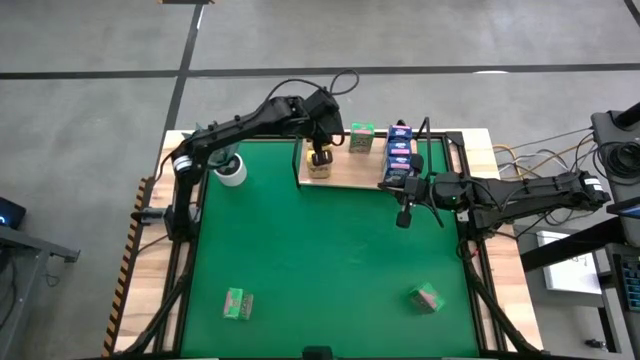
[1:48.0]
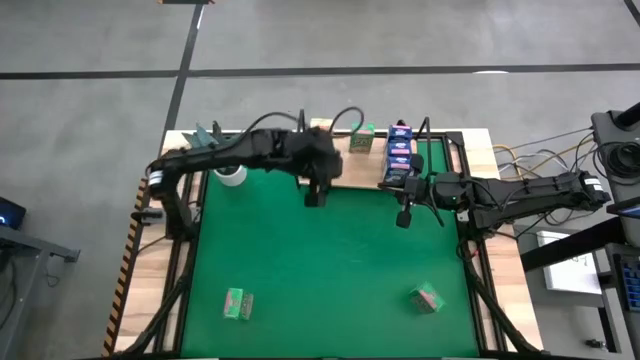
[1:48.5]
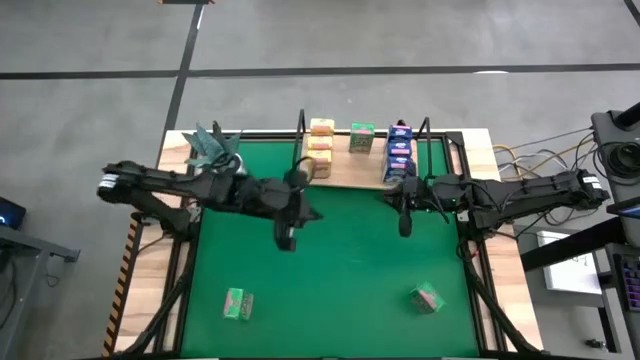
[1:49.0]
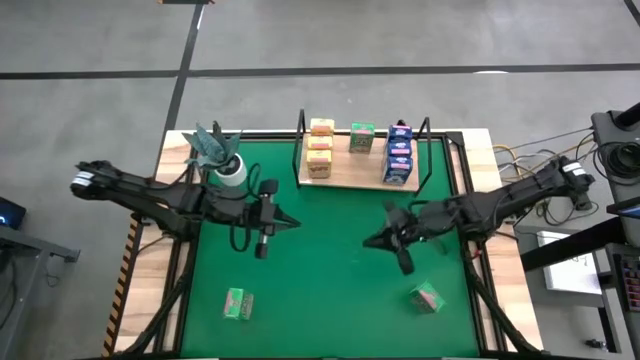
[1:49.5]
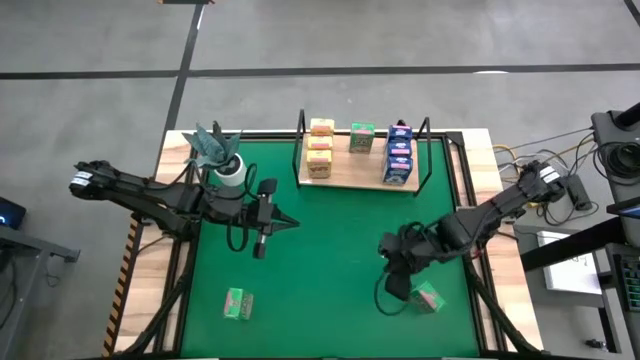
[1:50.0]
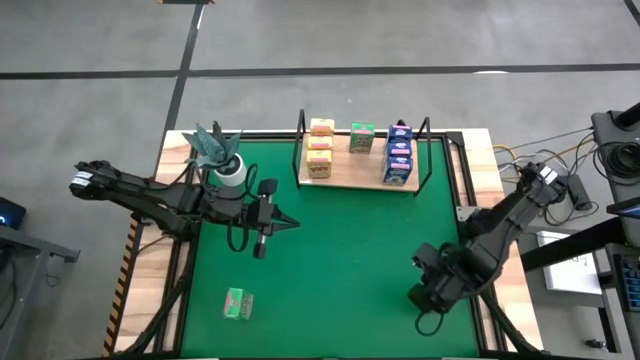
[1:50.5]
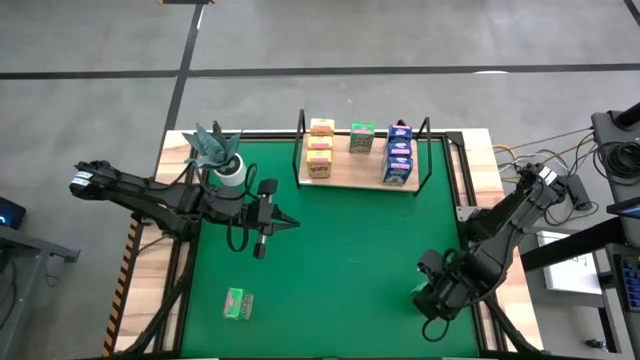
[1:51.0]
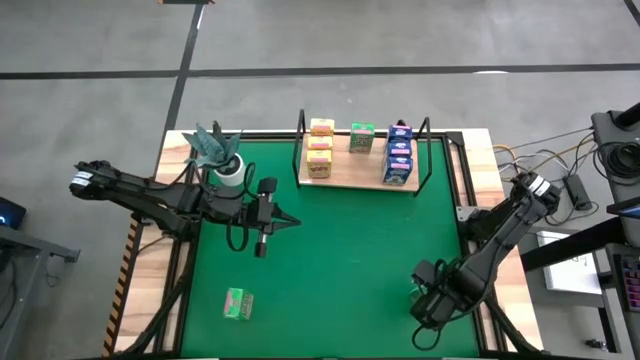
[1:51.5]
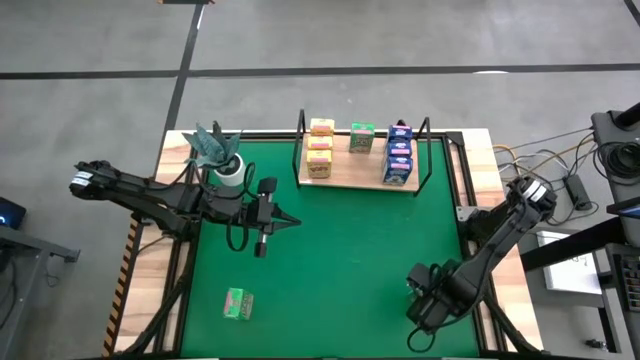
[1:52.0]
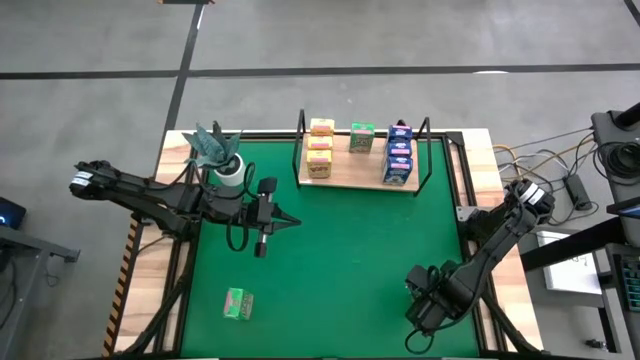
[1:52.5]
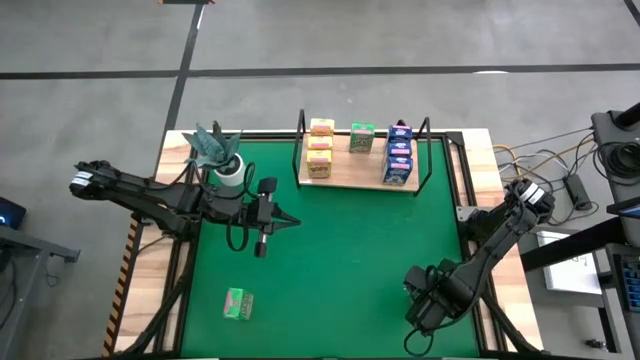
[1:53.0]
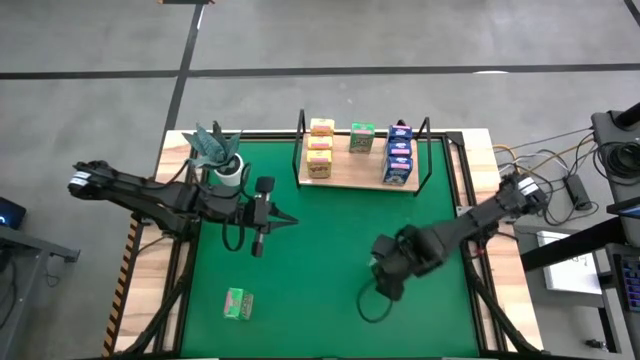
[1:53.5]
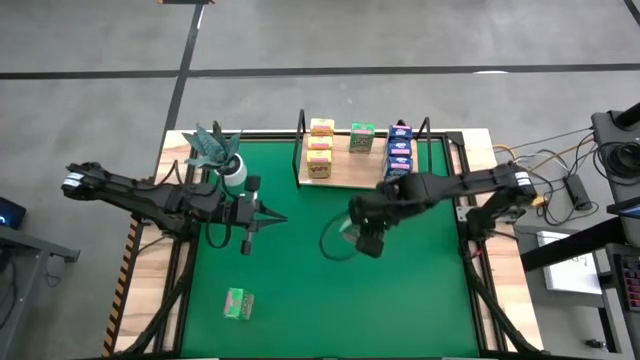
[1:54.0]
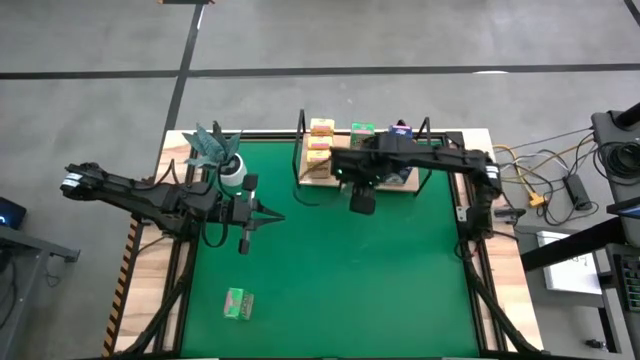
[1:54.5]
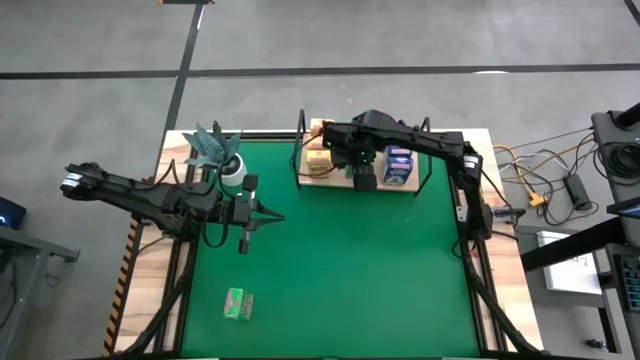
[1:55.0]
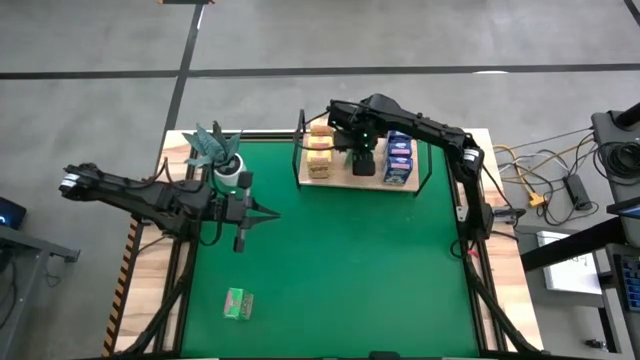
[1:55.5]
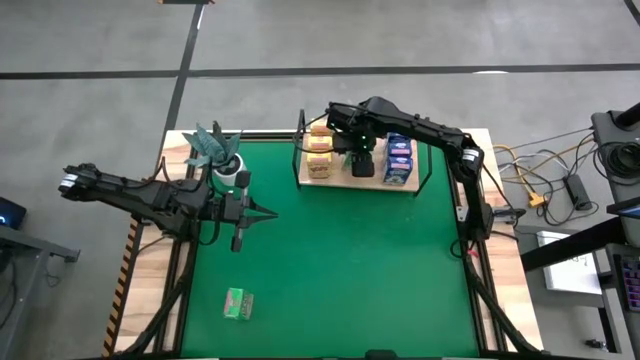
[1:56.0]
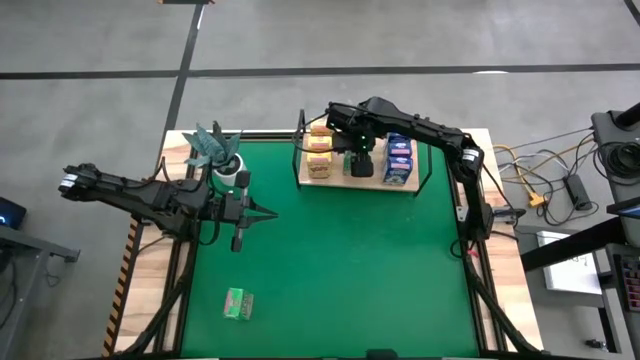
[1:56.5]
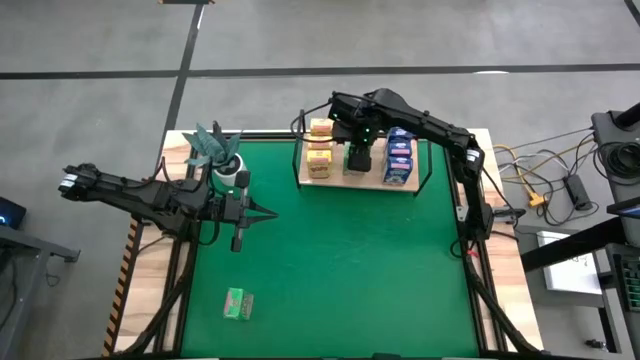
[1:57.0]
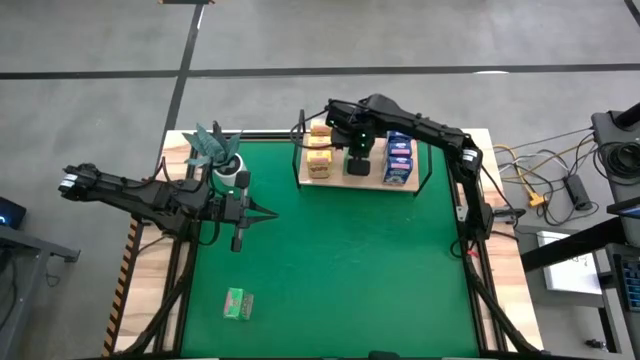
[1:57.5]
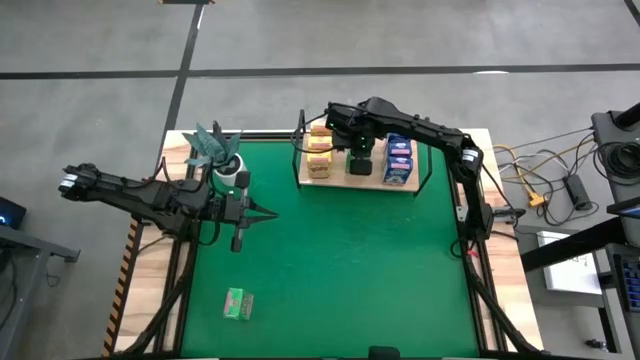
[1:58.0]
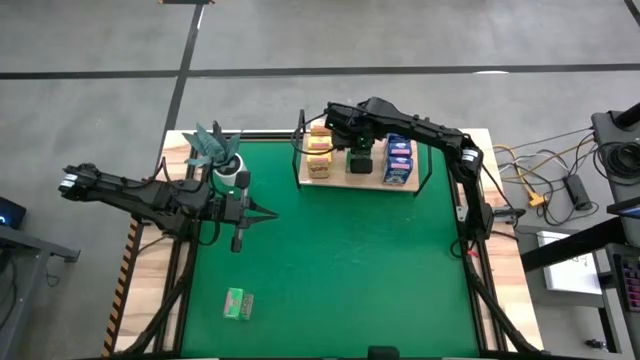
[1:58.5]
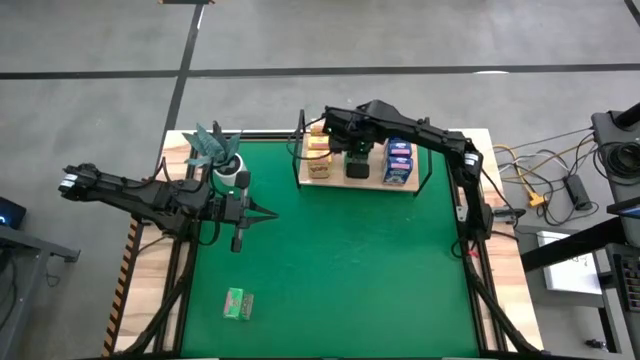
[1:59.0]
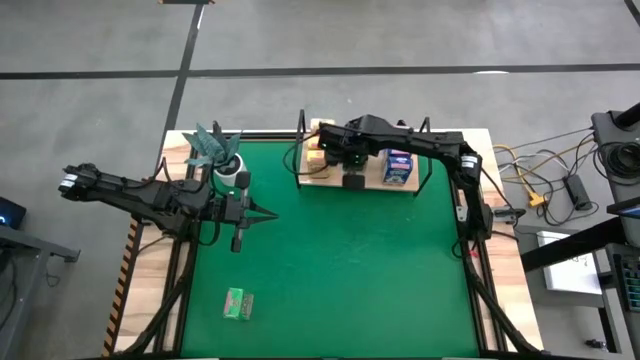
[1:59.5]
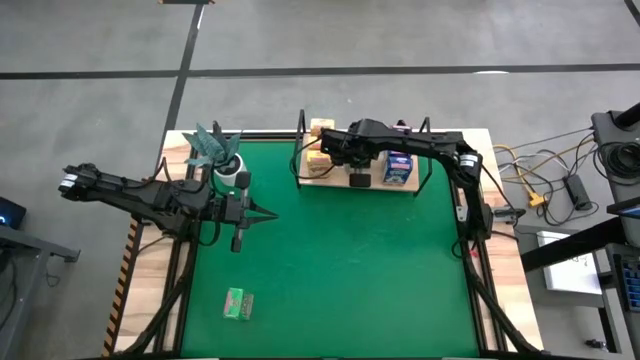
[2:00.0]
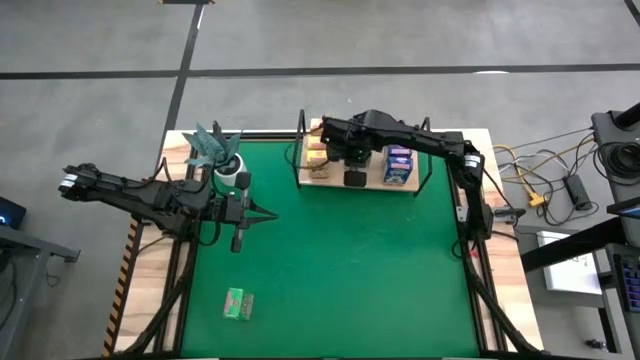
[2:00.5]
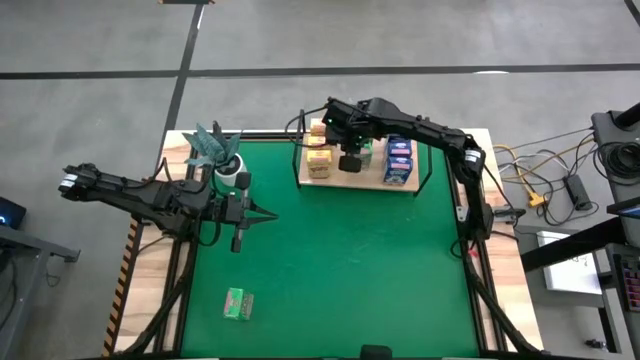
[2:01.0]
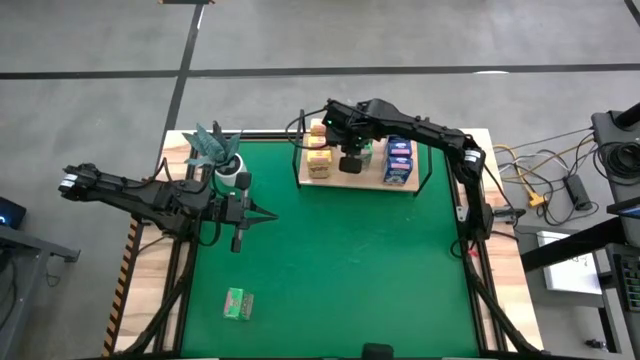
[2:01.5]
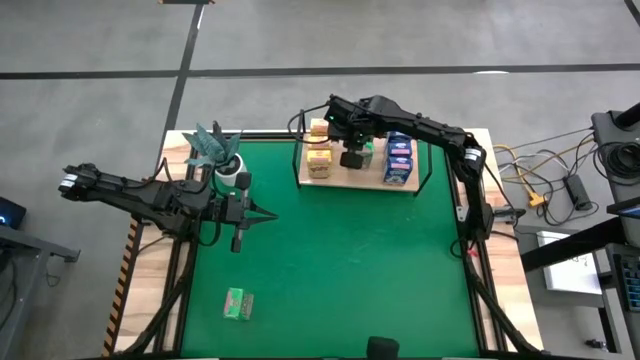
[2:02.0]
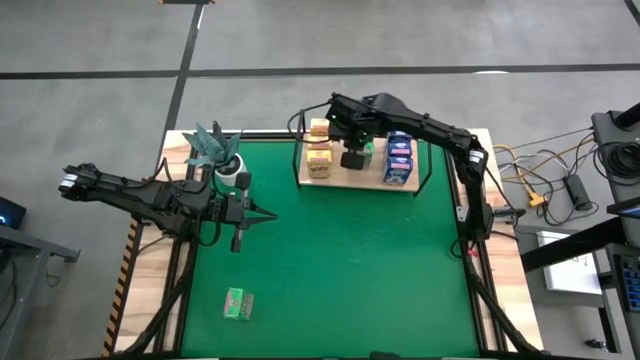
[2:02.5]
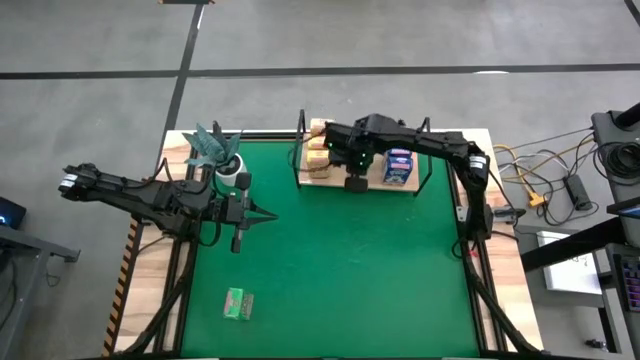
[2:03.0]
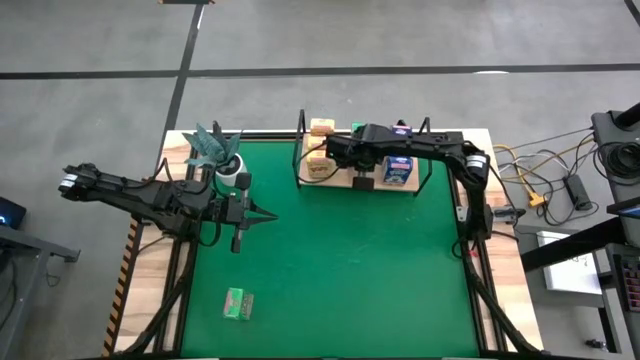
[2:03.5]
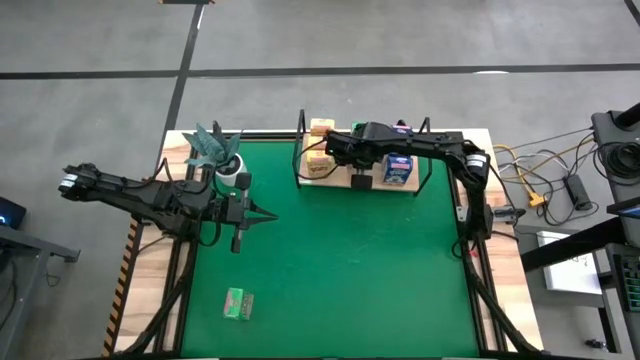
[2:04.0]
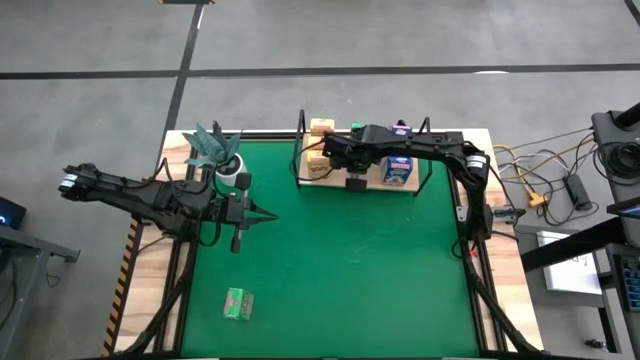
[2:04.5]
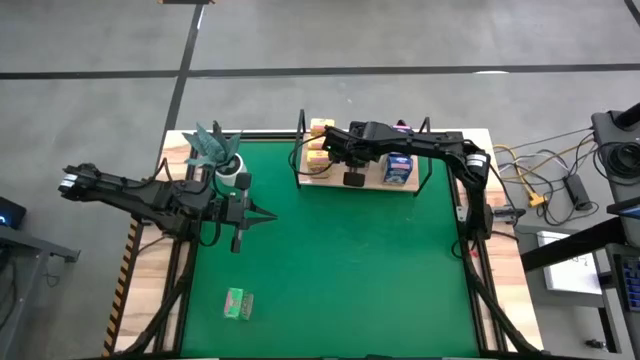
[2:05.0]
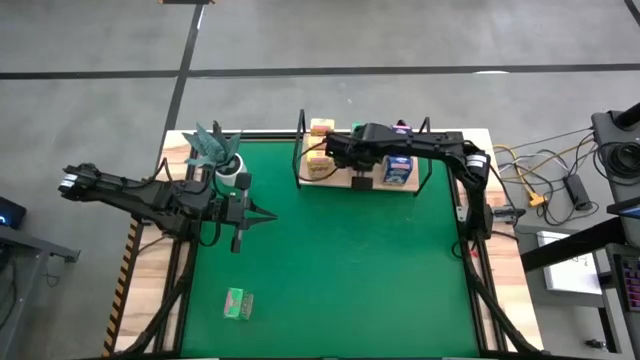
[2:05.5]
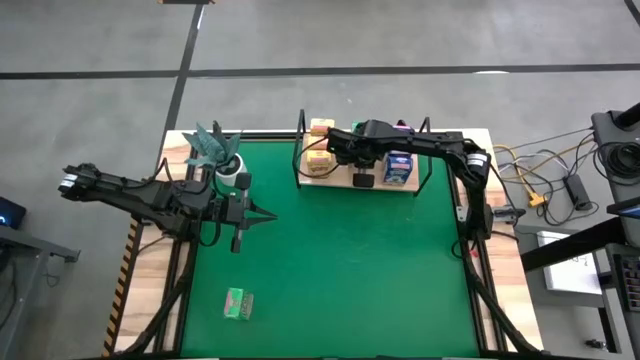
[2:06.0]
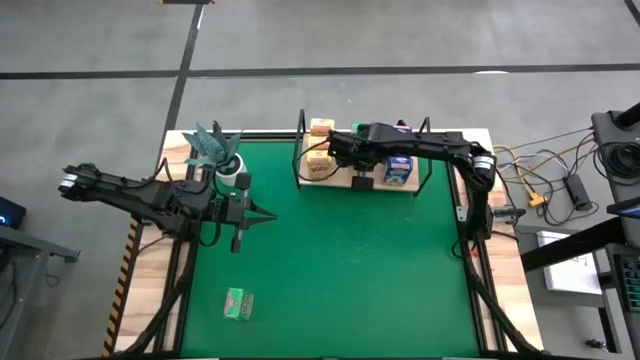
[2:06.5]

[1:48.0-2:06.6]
Task: Stack cereal on shelf
Put the right green cereal box on the shelf

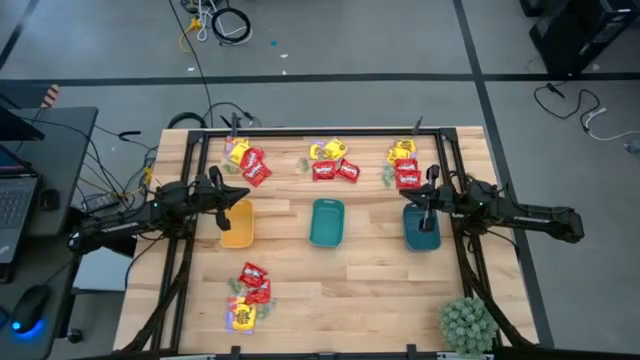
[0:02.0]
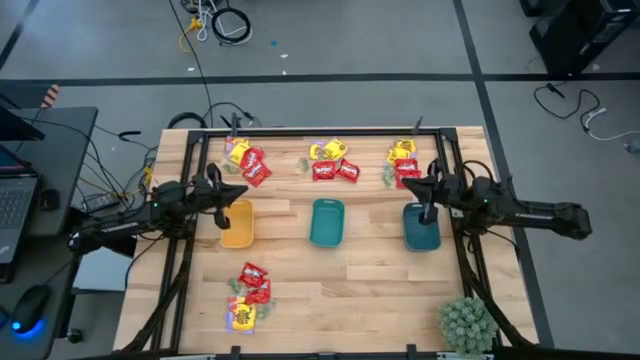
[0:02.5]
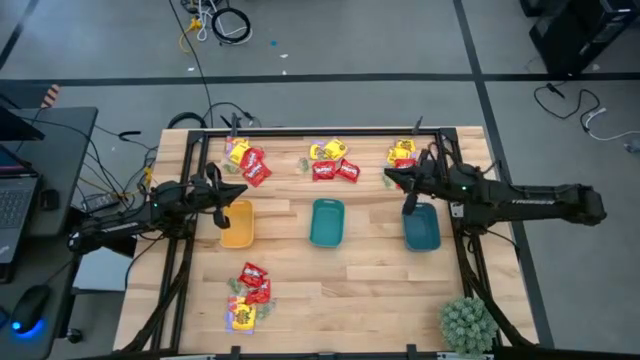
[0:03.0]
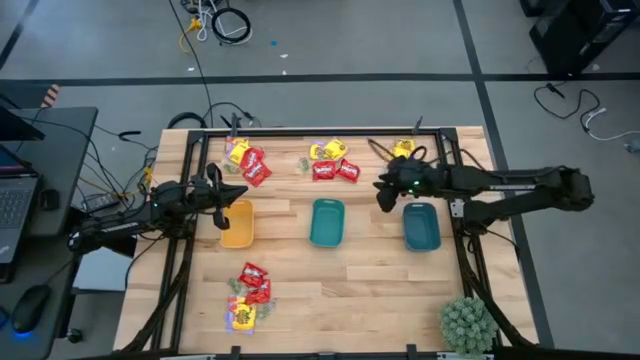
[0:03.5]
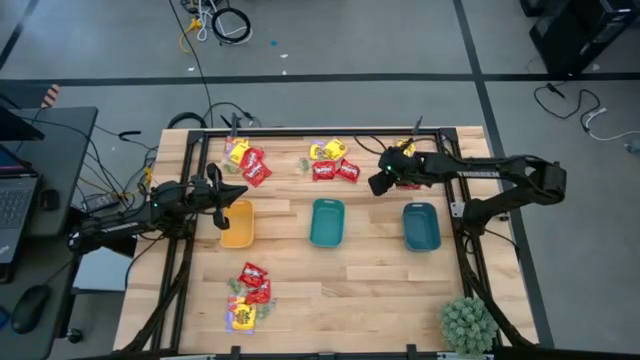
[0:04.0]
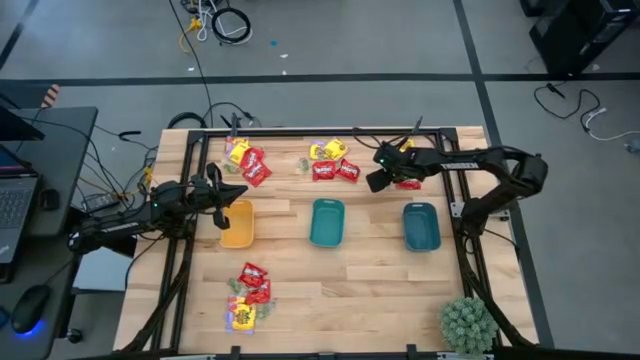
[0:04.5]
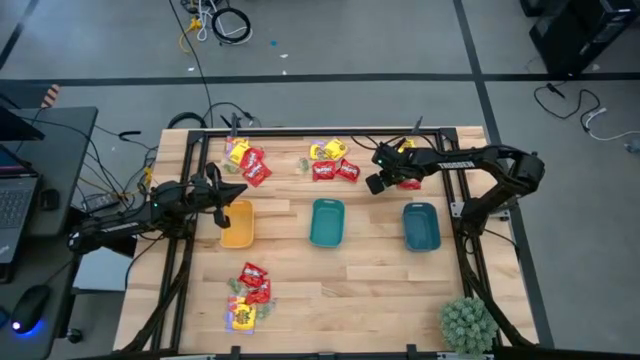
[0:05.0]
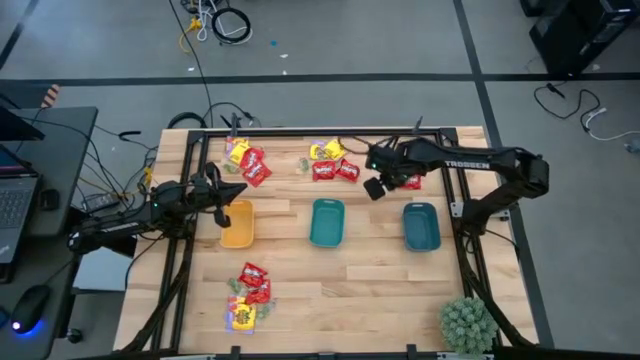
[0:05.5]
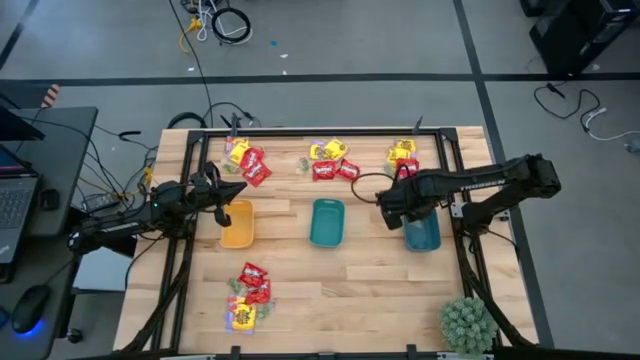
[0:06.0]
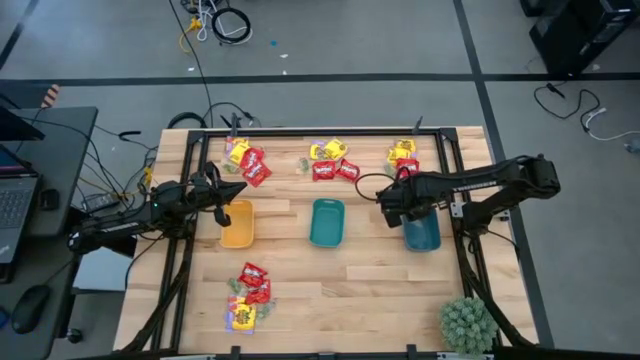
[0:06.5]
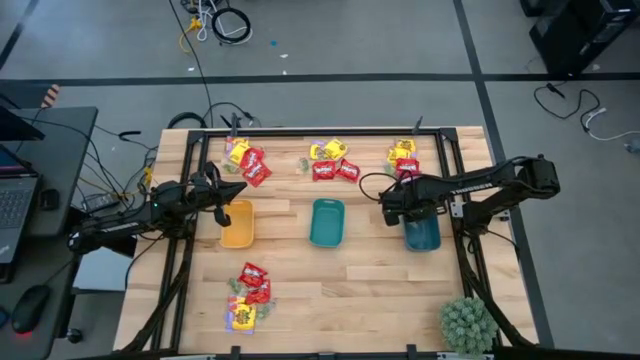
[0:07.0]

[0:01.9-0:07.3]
Task: Sort candy
Put the green transparent candy into the blue bin
